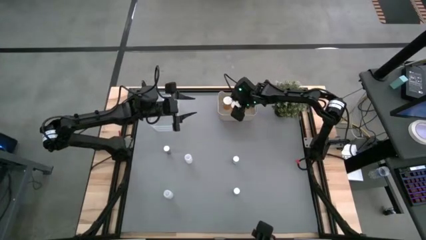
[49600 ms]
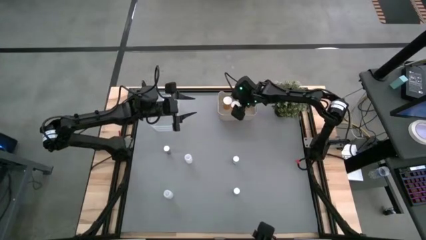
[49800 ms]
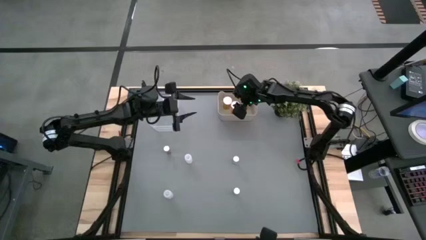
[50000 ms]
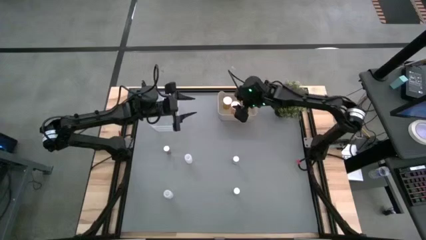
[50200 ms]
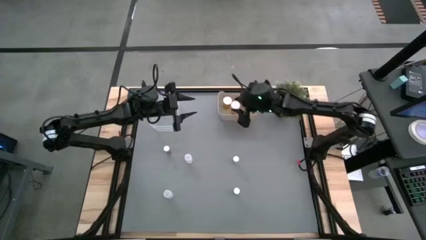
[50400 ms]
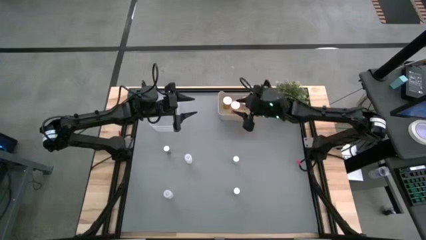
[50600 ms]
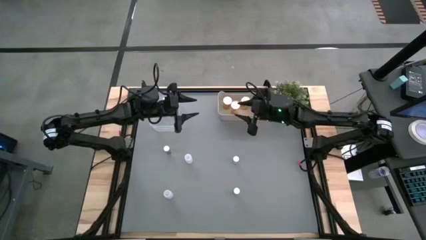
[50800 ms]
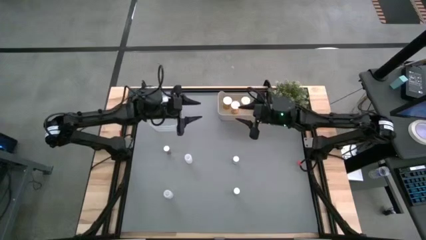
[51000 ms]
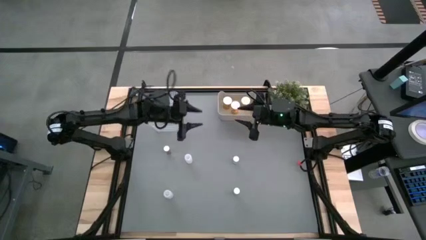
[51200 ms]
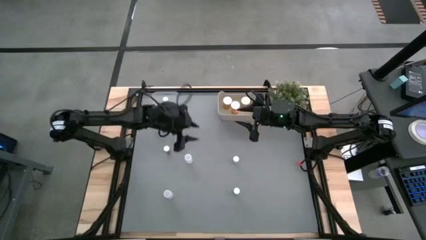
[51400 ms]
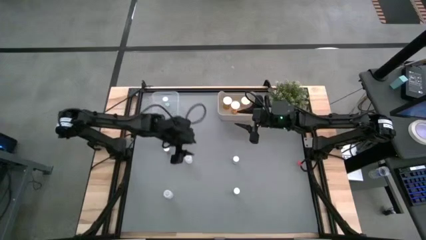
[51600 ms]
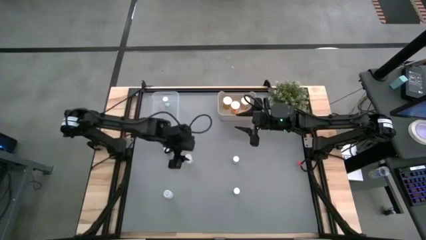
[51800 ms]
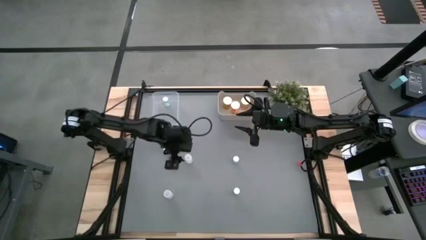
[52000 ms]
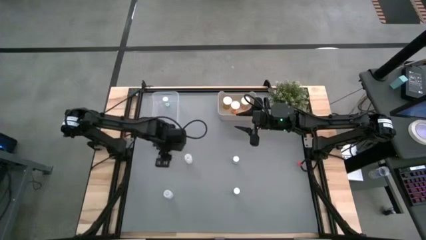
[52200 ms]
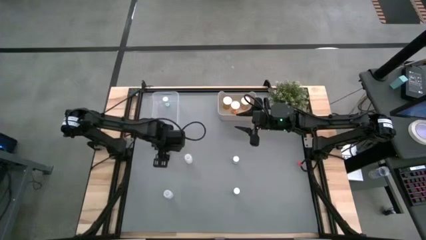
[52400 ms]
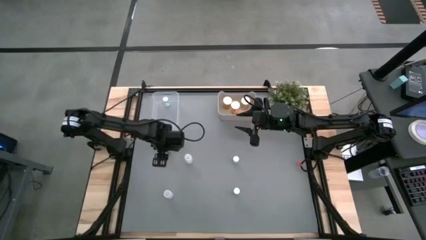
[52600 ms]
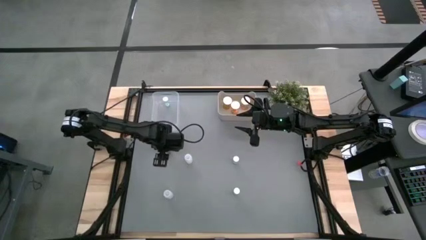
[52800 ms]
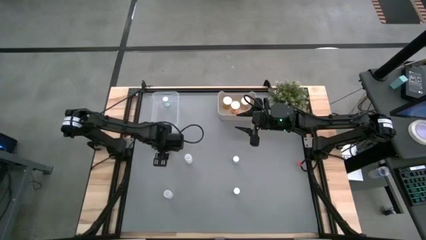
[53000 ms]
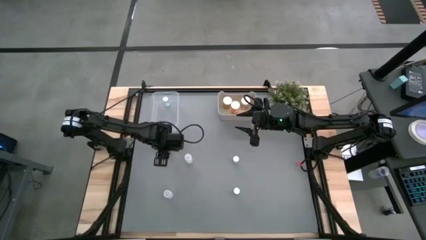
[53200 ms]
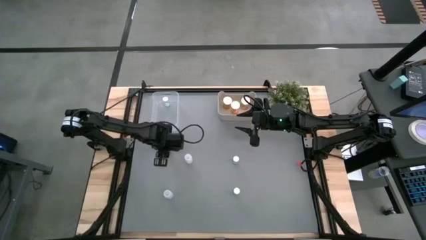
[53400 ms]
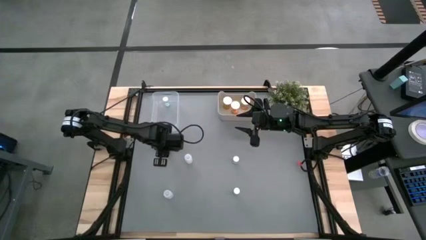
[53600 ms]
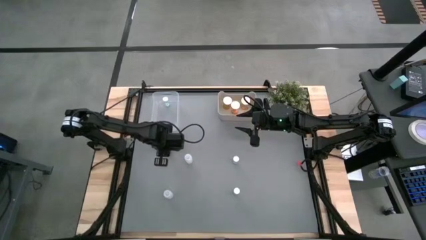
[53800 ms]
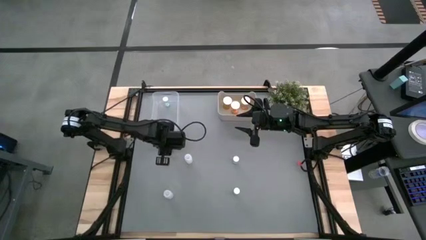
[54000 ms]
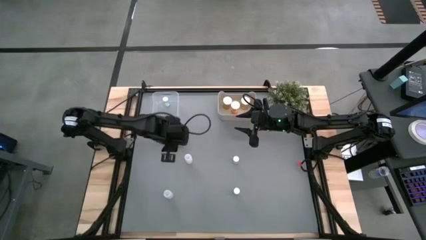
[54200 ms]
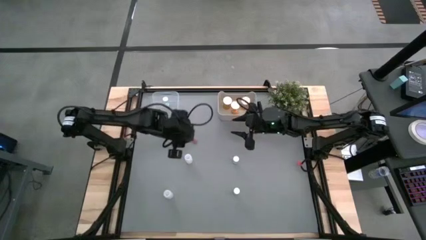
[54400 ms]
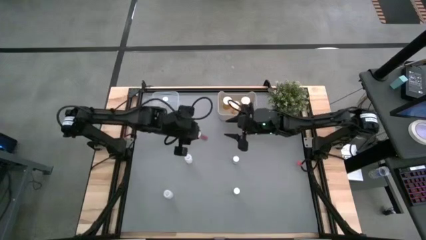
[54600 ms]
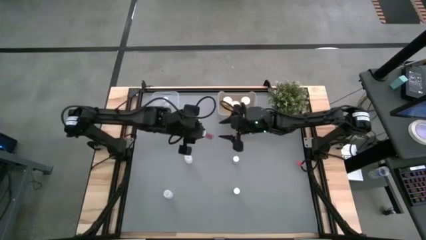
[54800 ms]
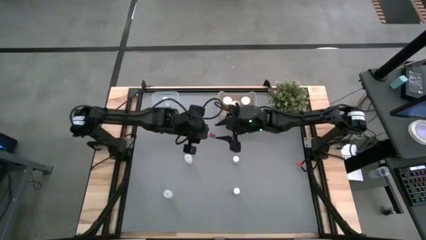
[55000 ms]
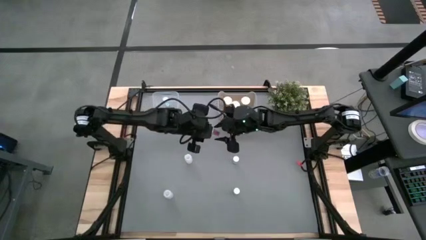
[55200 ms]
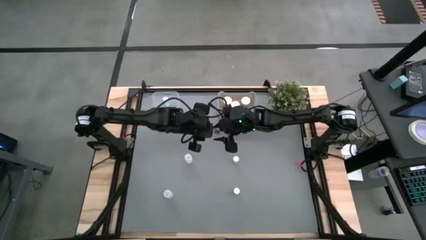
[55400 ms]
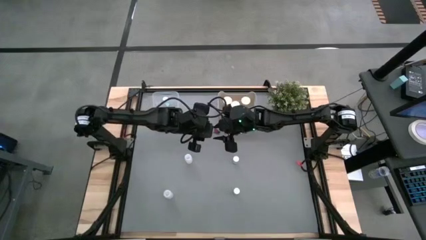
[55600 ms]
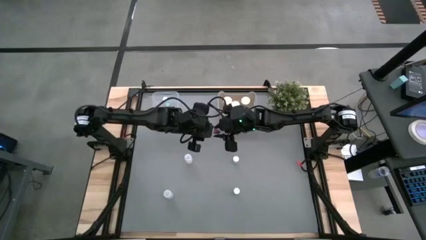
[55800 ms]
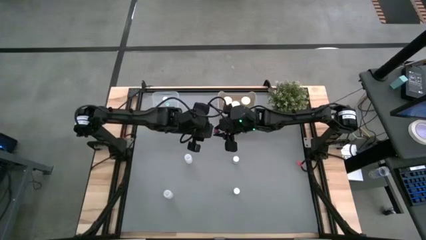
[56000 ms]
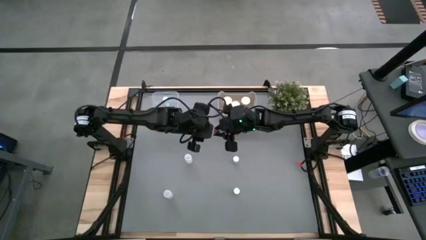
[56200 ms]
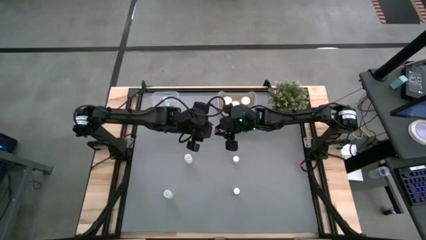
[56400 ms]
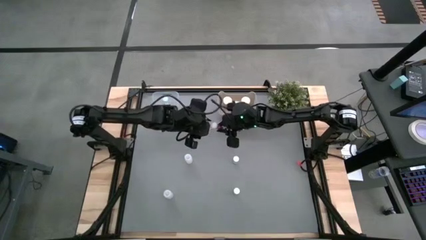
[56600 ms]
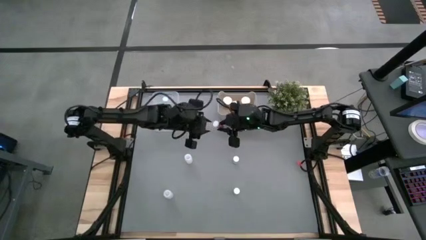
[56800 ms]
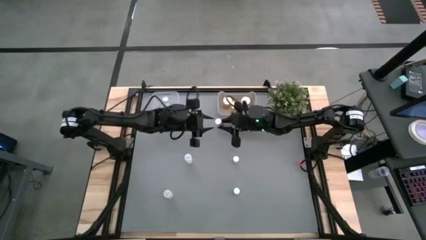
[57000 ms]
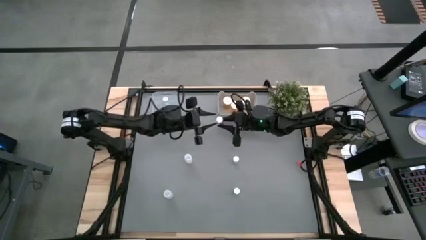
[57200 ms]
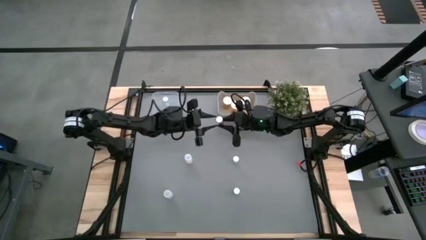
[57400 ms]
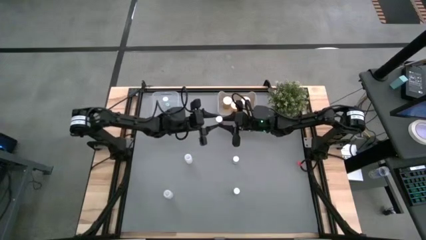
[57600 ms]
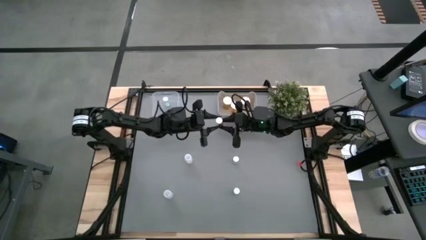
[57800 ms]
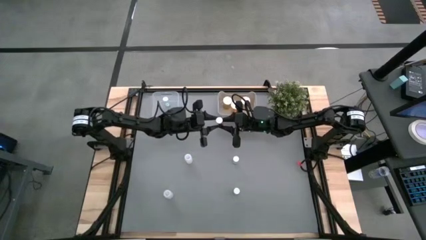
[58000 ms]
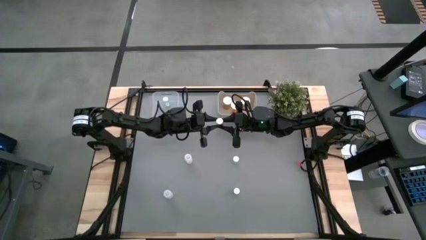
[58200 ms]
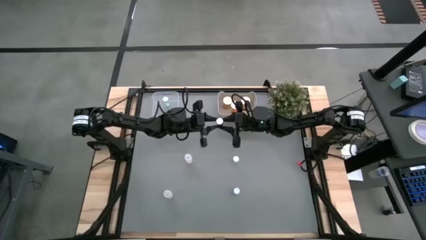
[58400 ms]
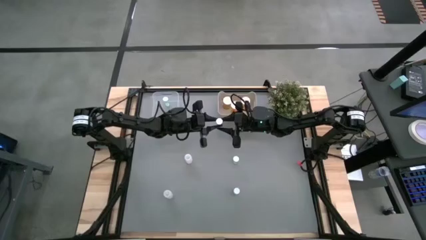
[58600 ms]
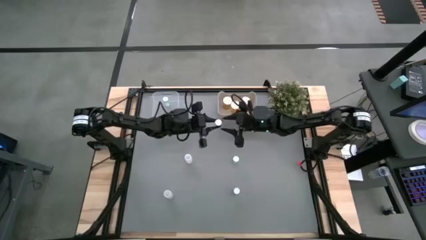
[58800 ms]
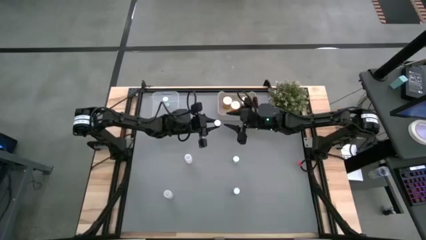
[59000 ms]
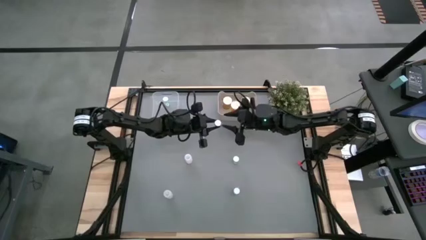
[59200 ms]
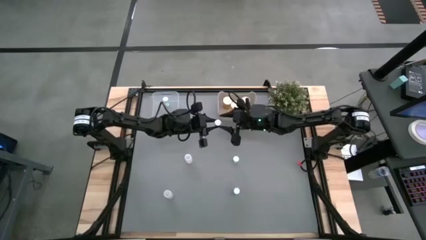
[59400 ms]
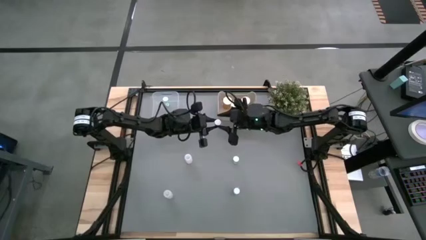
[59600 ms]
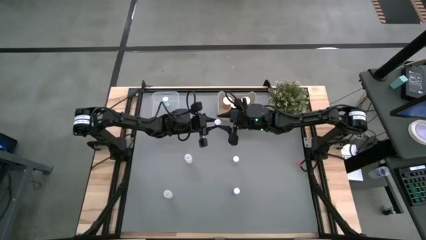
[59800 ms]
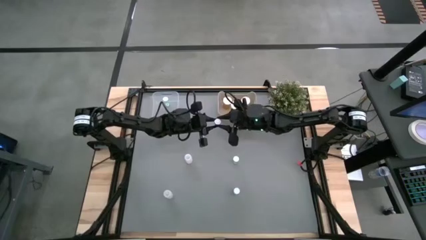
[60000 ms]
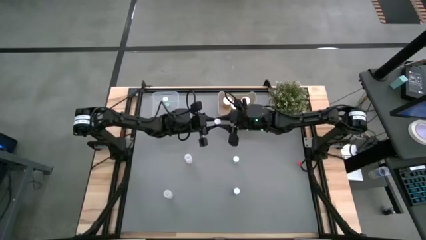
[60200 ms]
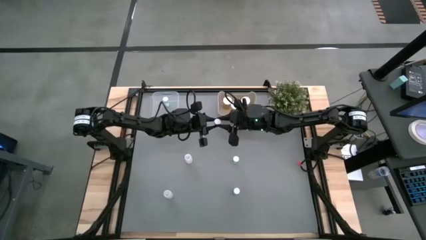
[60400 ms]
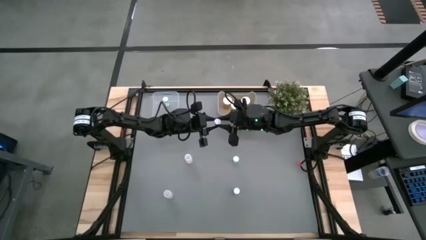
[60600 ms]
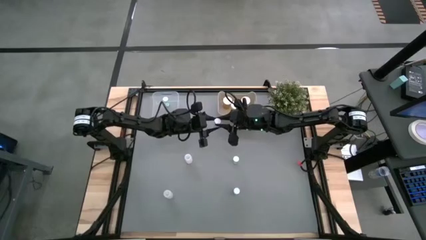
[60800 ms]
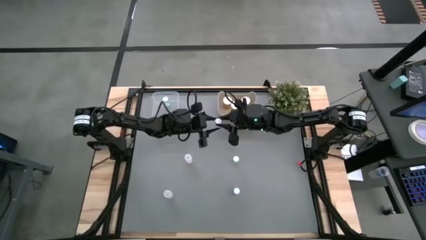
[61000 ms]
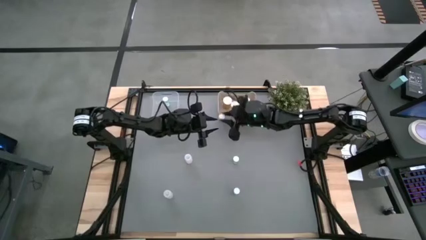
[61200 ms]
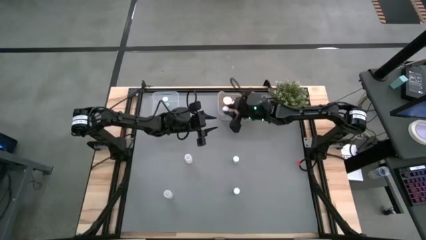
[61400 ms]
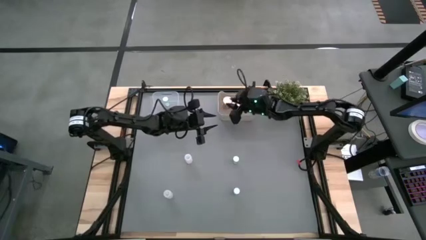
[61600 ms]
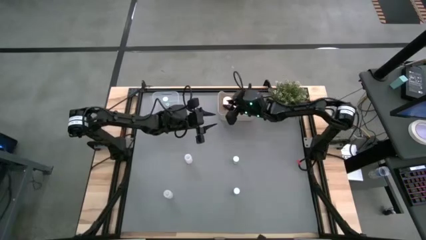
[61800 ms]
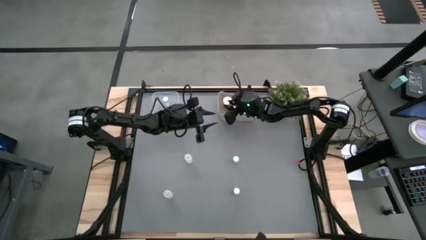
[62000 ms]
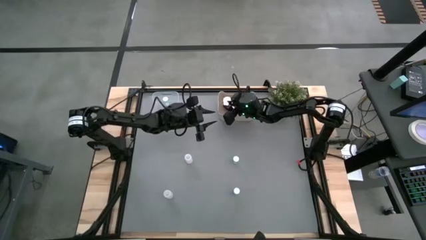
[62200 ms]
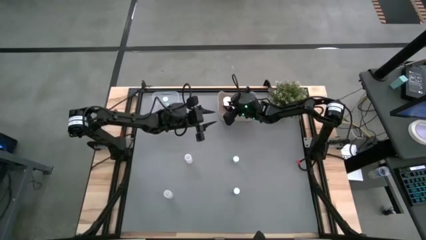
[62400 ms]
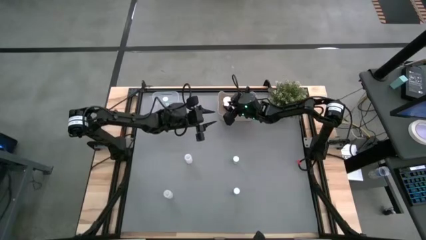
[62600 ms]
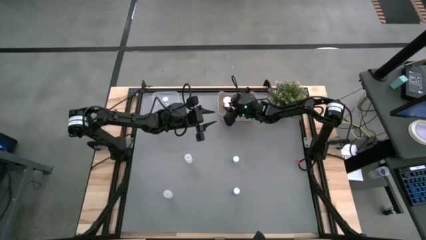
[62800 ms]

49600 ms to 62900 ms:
Task: Pick and place medicine bottles into bin by pill shape (circle, oval)
Put the blue capsule bottle into the gray bin

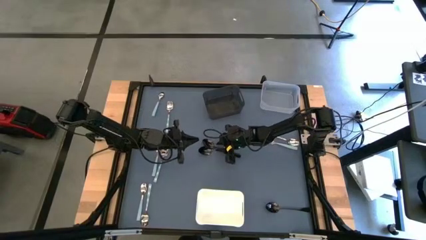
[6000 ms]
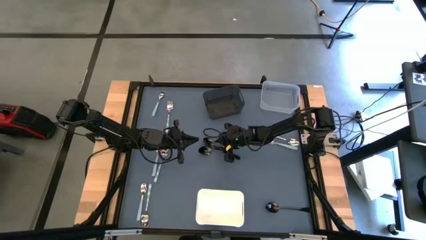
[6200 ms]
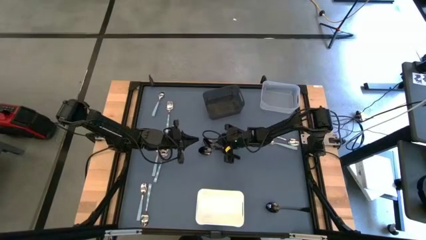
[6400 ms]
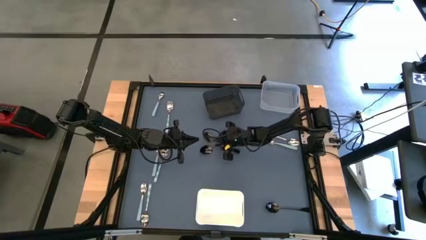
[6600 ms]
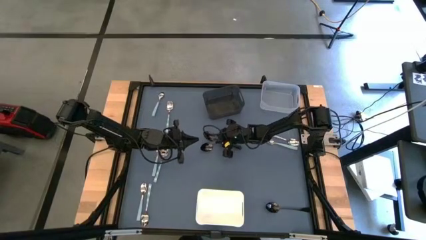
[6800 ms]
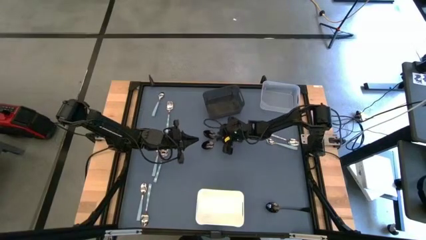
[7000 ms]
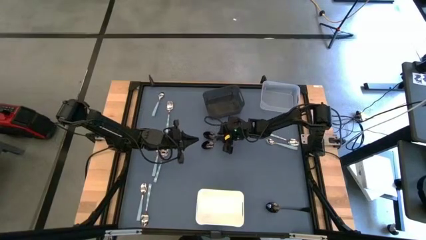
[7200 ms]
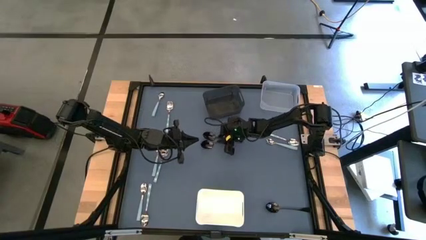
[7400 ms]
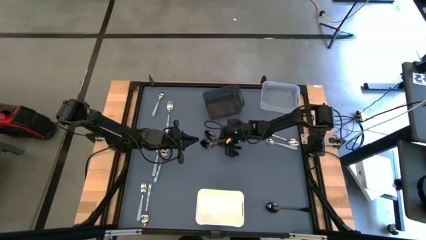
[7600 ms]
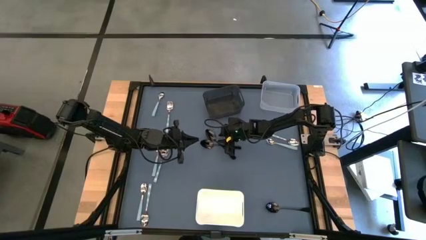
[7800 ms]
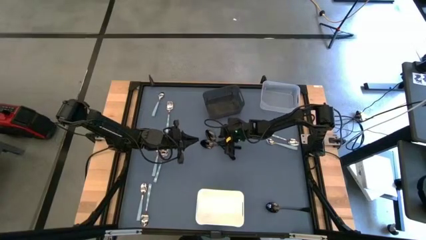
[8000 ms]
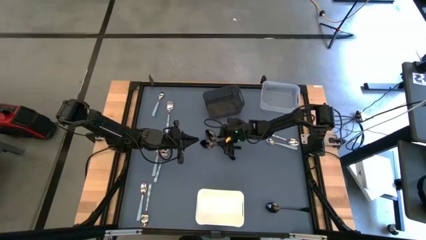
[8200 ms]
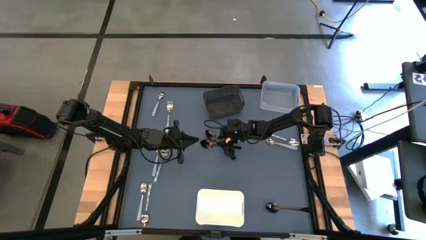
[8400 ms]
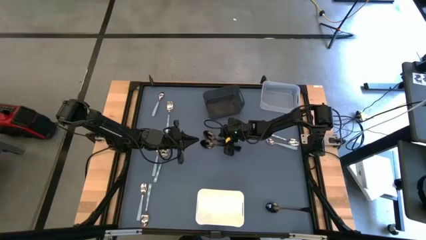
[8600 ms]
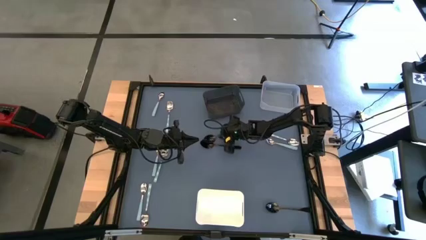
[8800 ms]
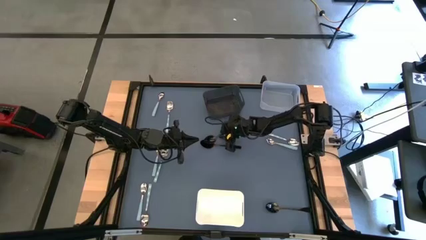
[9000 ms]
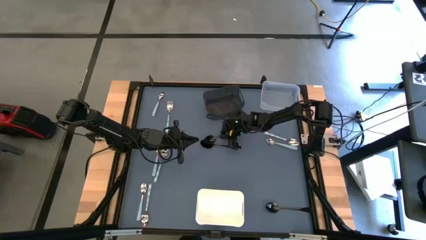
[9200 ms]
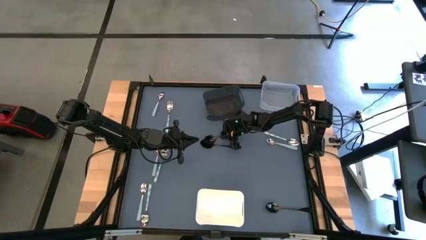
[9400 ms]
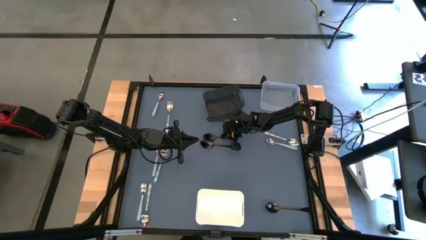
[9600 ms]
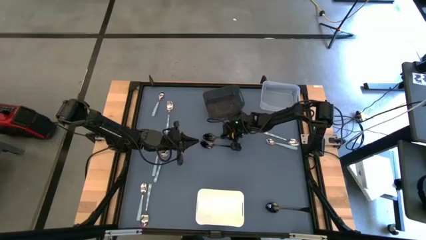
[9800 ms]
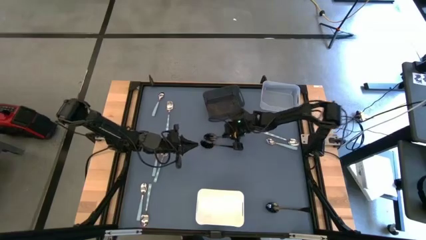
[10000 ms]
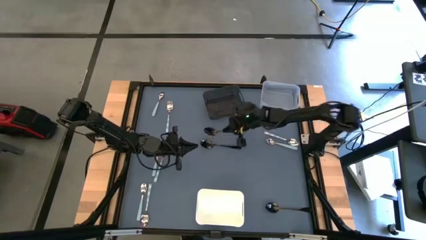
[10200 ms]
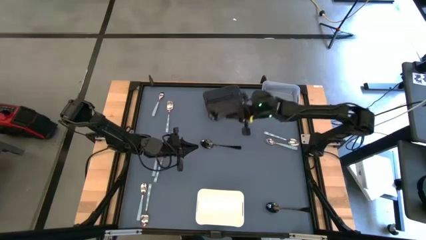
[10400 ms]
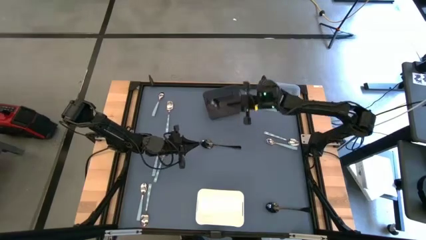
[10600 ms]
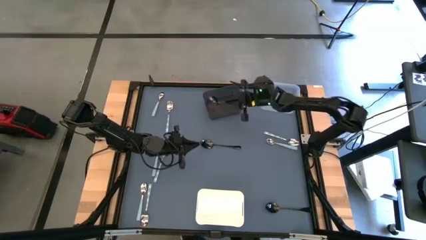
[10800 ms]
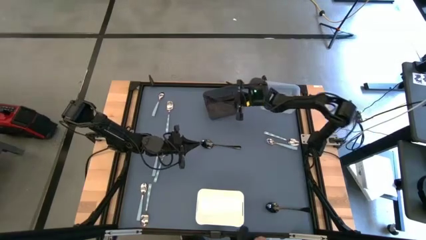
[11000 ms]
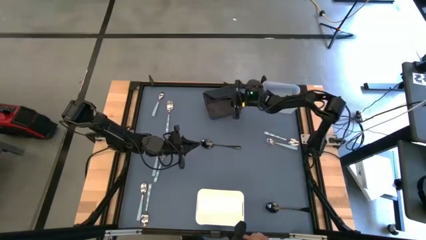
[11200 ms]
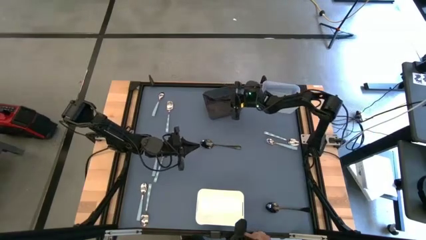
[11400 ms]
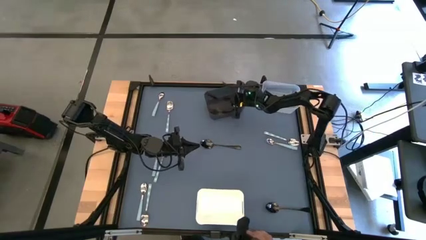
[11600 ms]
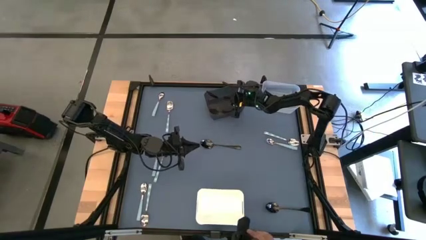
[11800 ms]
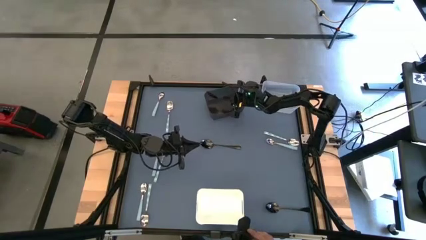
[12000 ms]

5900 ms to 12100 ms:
Task: Sort silverware by color (type)
Put the black spoon into the black bin
